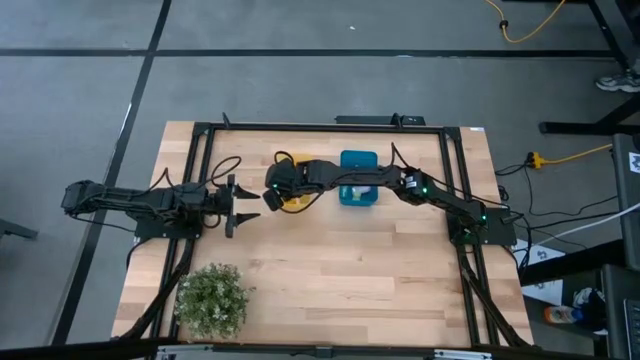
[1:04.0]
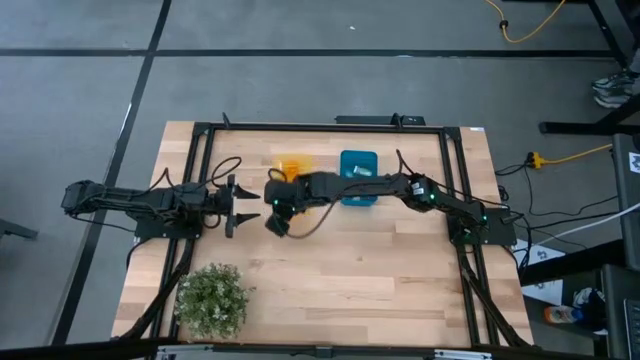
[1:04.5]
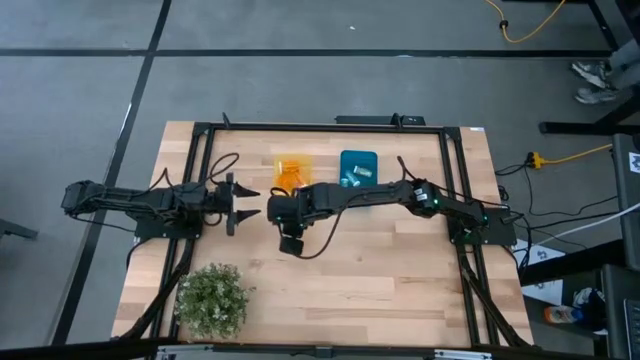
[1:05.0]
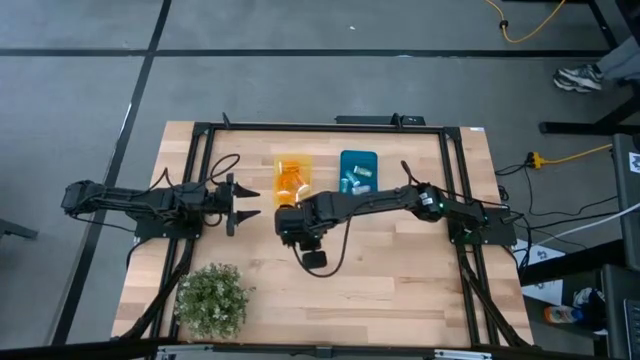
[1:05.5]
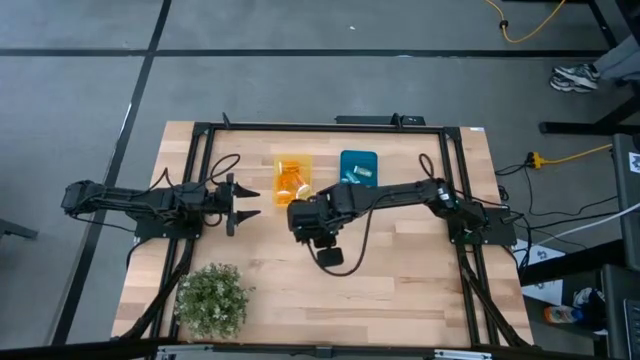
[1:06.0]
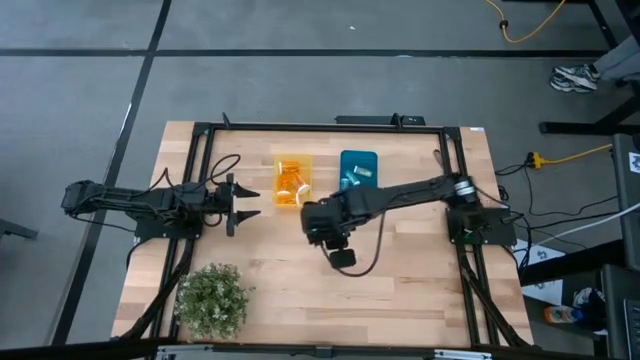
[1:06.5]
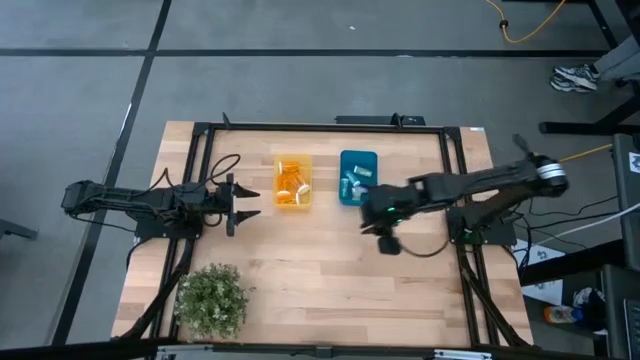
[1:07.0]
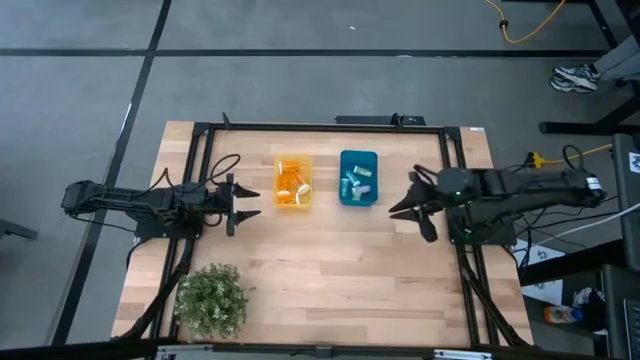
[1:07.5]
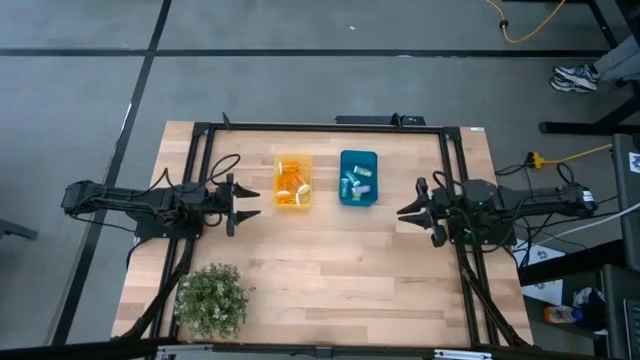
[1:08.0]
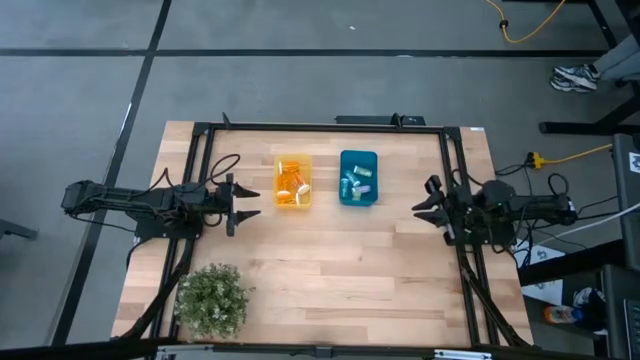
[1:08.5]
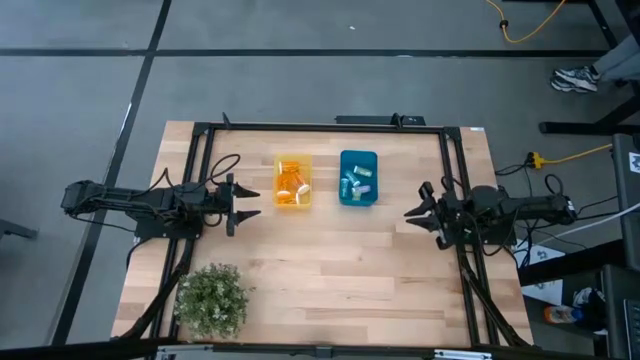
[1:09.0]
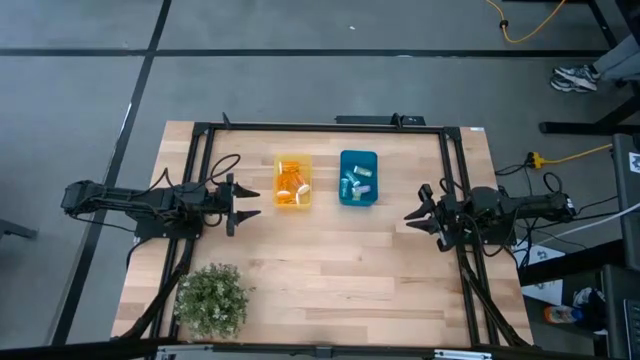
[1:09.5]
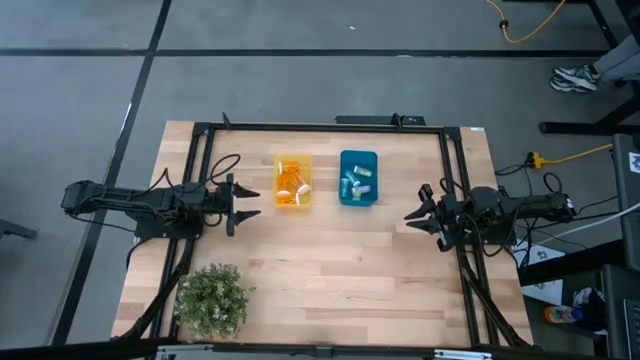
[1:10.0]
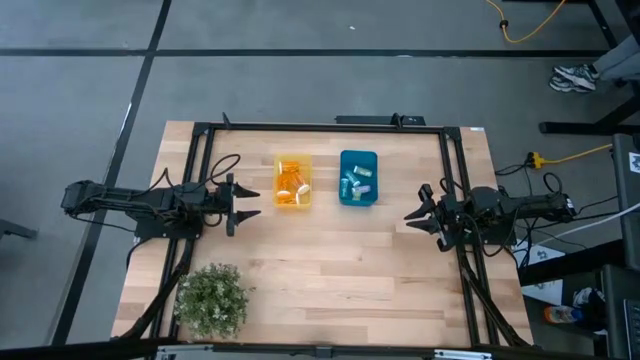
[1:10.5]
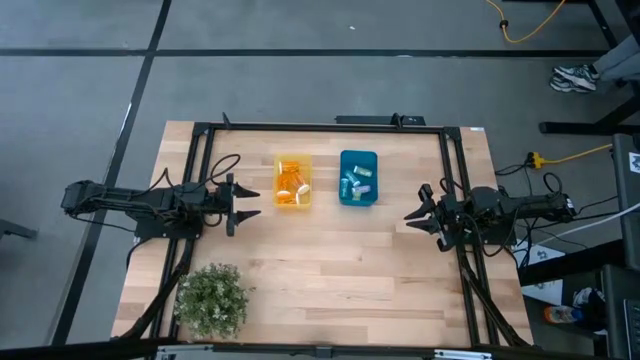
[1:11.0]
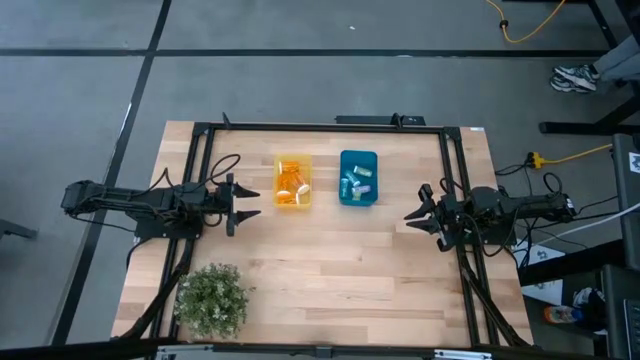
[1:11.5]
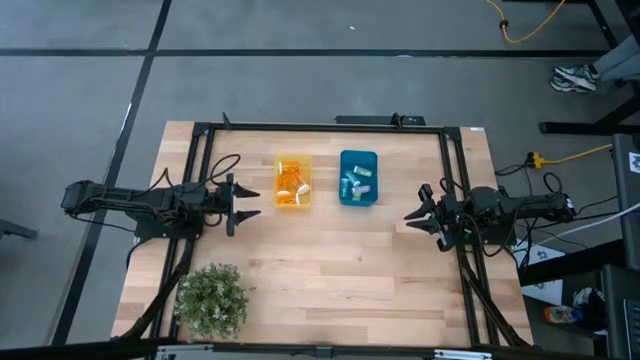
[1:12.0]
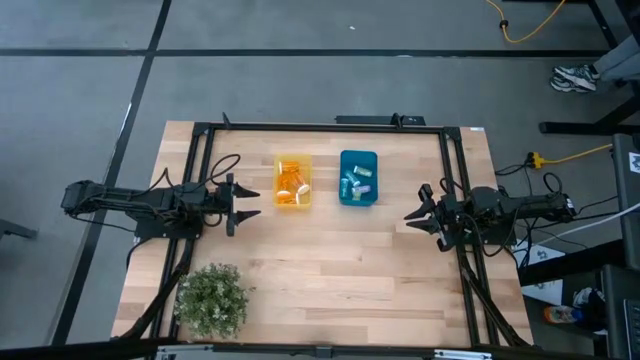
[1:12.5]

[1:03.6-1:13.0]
Task: Pick and place medicine bottles into bin by pill shape (circle, oval)
Return to Home Position

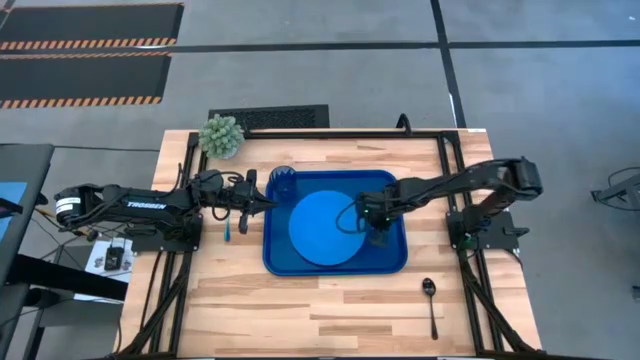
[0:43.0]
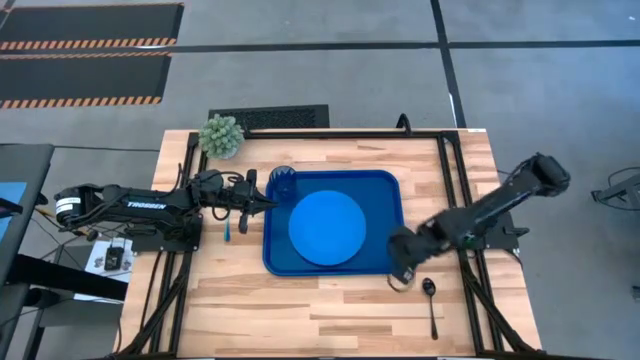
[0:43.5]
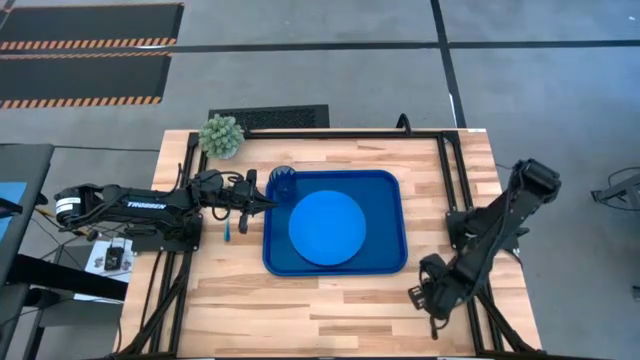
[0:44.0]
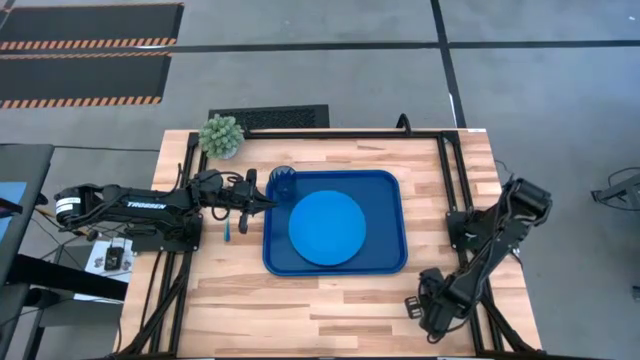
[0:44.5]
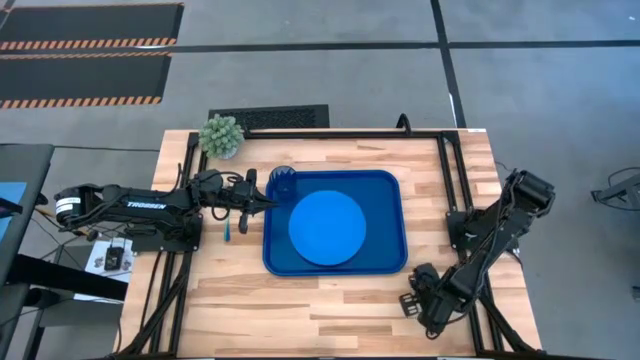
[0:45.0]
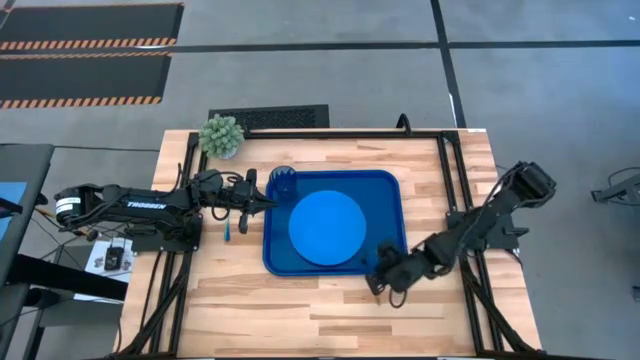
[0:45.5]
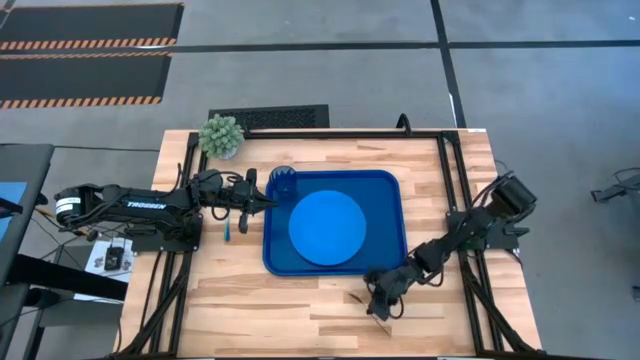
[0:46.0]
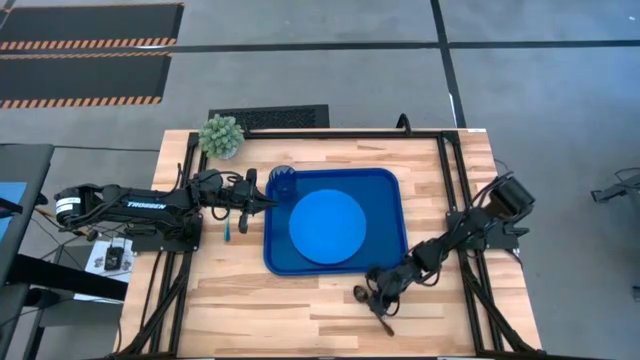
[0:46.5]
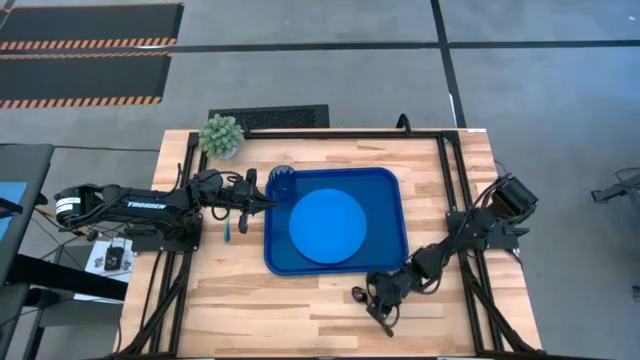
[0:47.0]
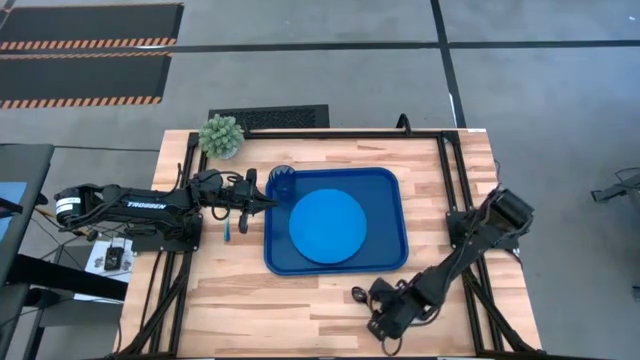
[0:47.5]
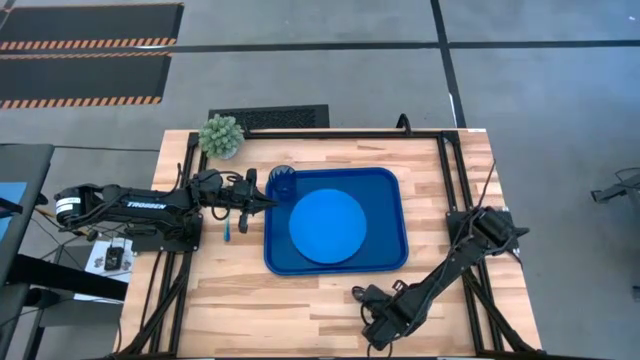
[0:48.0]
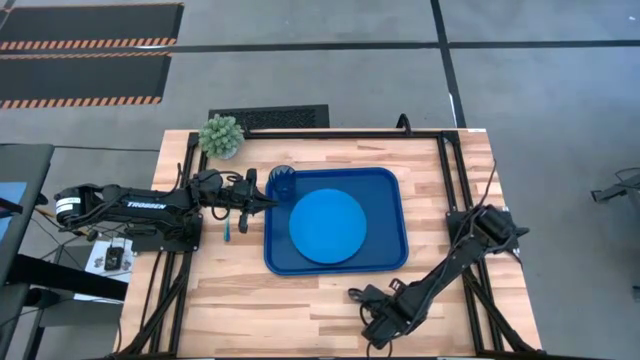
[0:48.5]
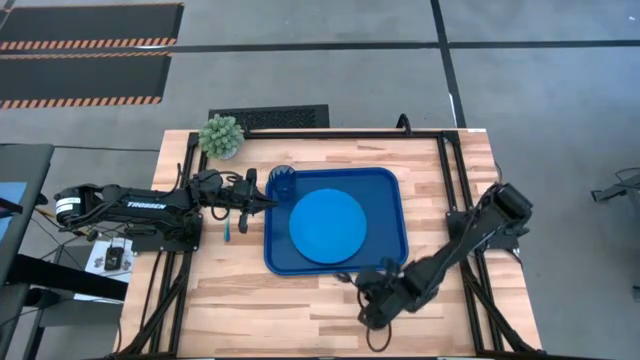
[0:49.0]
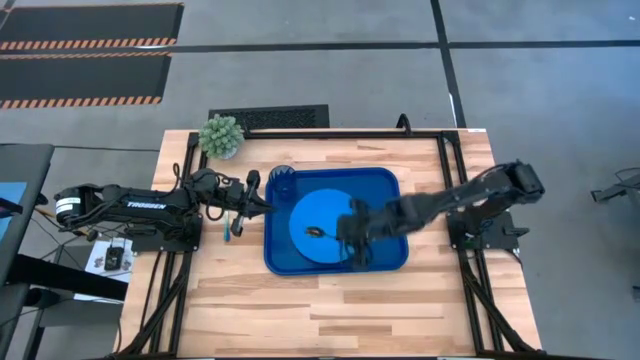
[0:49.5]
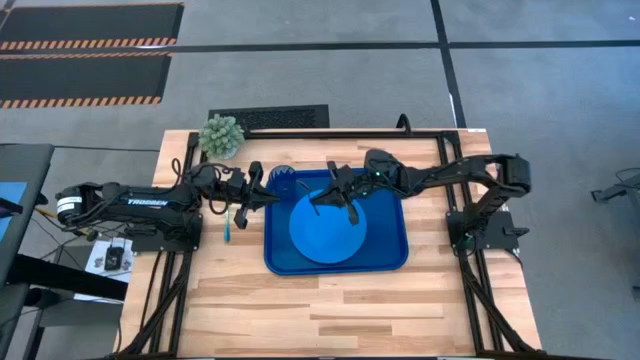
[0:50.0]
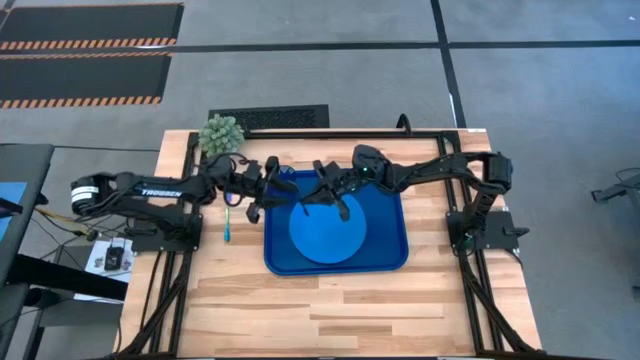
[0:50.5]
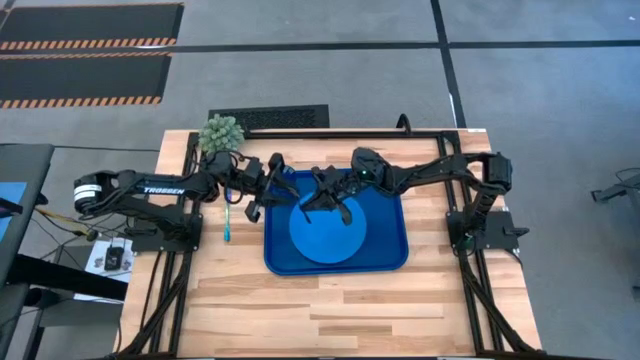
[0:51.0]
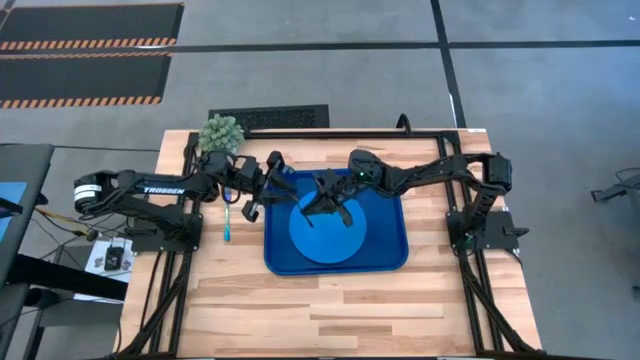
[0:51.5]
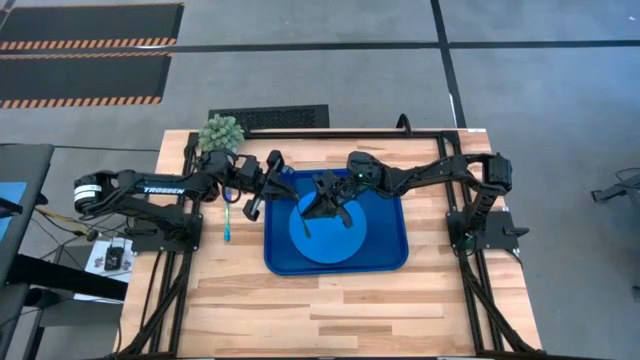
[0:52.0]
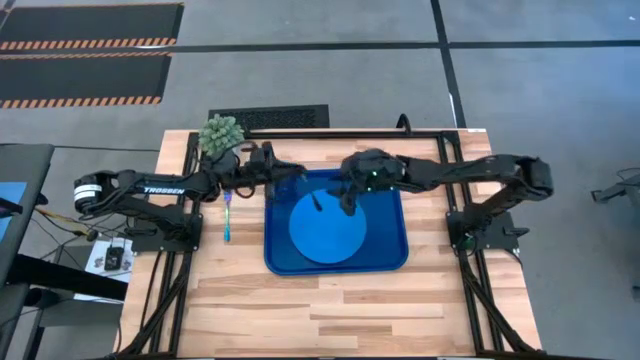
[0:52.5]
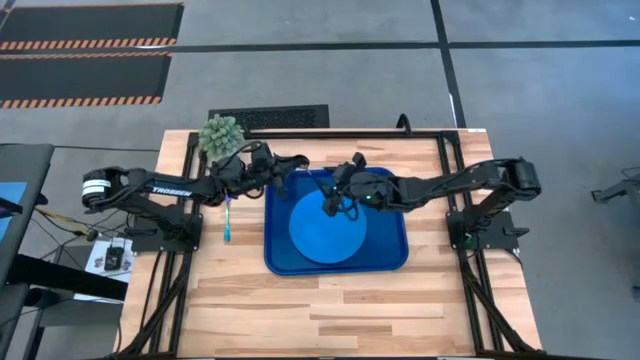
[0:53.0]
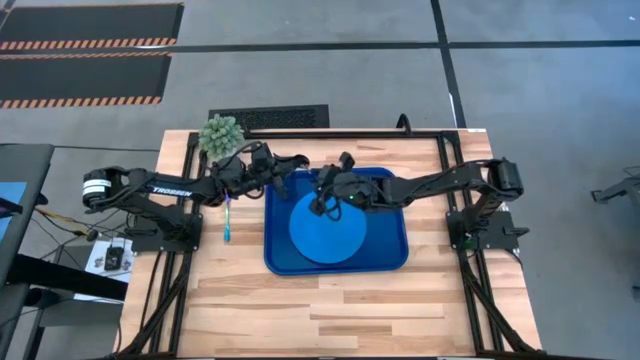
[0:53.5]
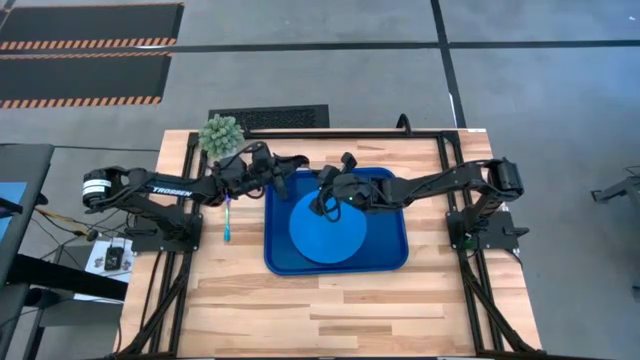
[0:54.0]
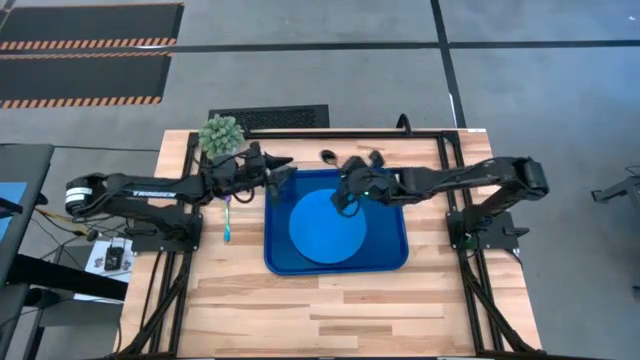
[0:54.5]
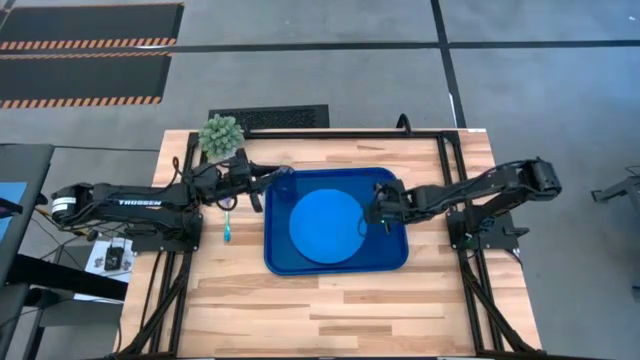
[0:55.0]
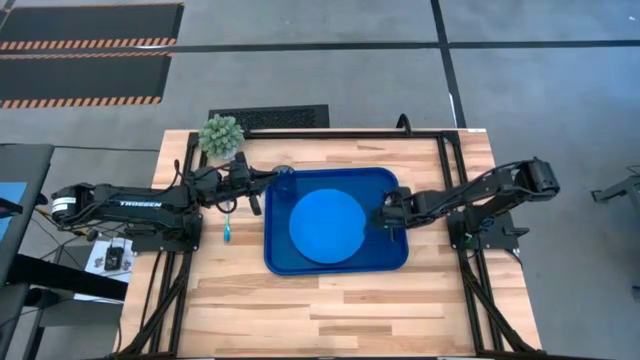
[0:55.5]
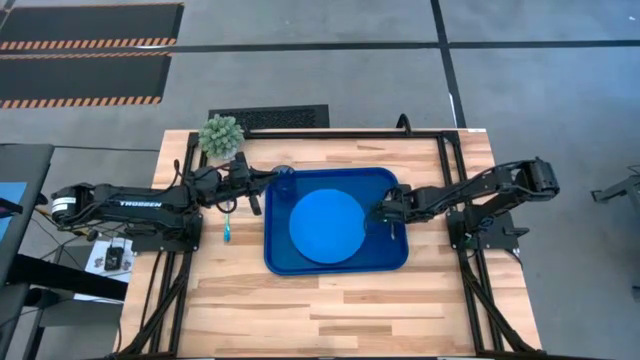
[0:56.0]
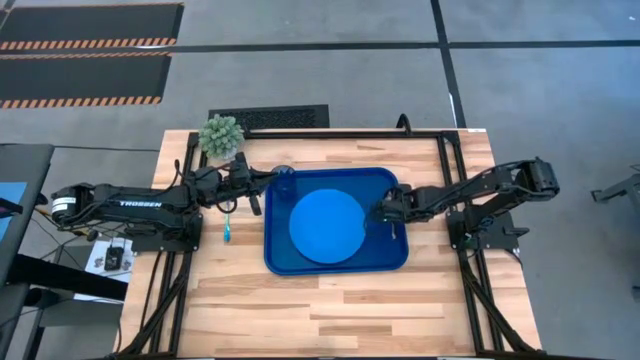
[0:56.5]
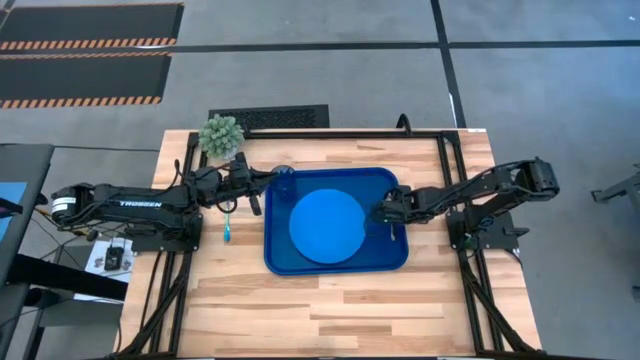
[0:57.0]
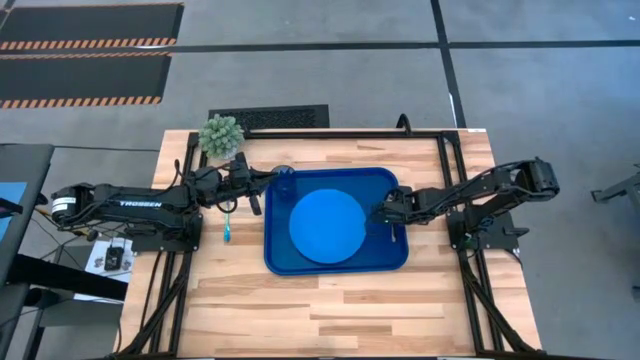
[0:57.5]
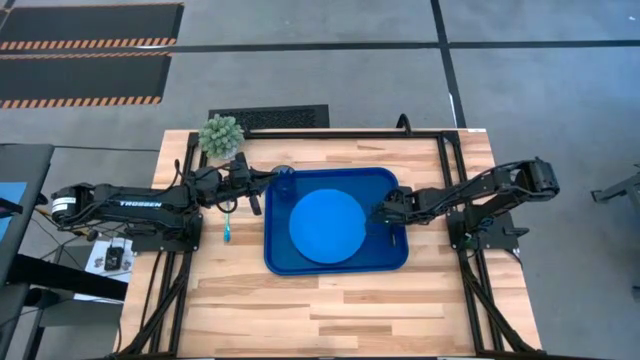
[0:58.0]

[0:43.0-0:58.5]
Task: Pick and place plate/cup/fork/spoon on tray
Put the black spoon on the blue tray to the right of the light blue plate
